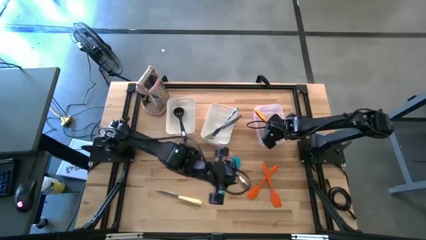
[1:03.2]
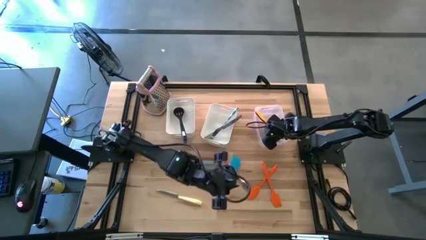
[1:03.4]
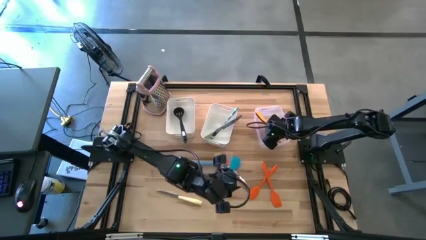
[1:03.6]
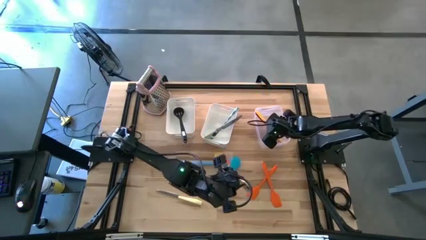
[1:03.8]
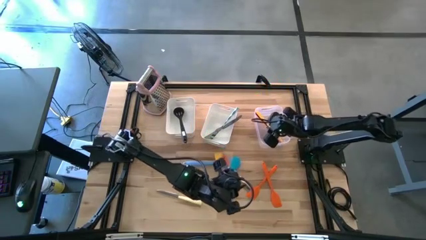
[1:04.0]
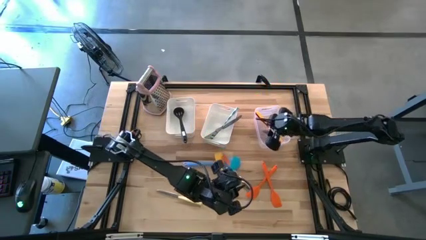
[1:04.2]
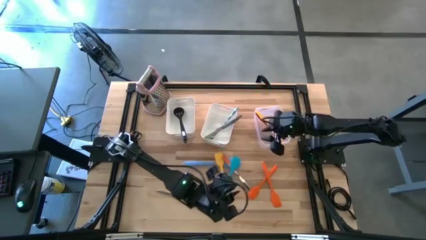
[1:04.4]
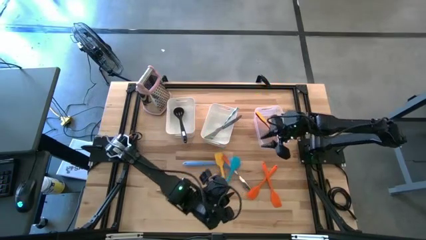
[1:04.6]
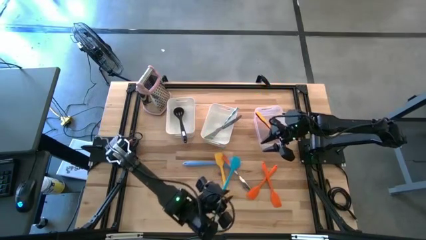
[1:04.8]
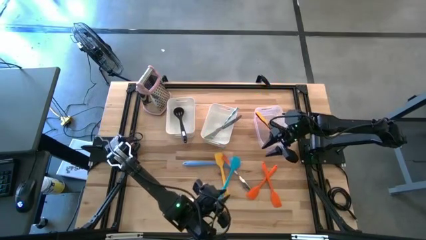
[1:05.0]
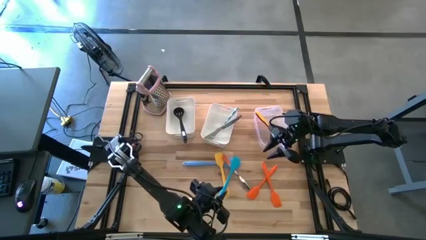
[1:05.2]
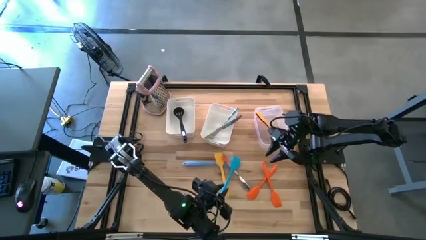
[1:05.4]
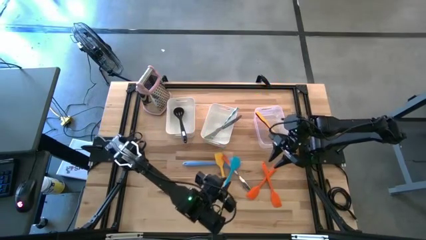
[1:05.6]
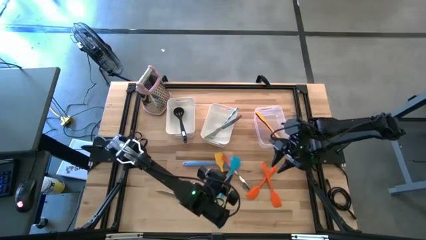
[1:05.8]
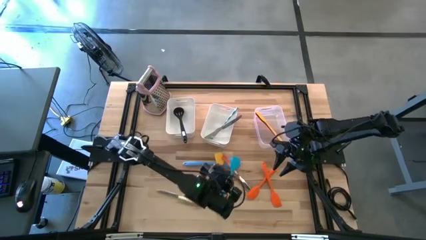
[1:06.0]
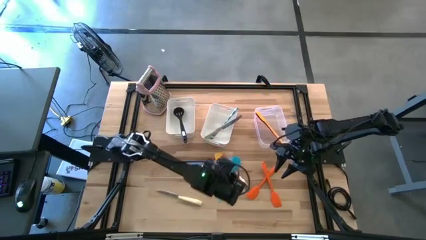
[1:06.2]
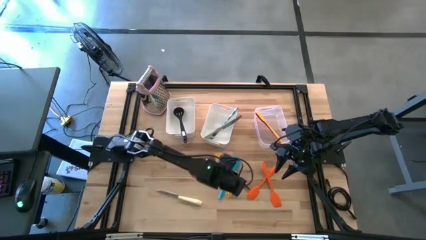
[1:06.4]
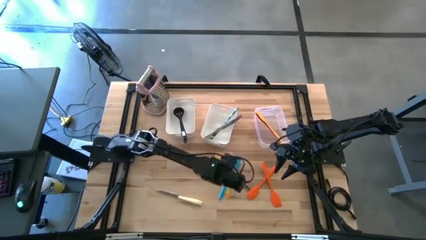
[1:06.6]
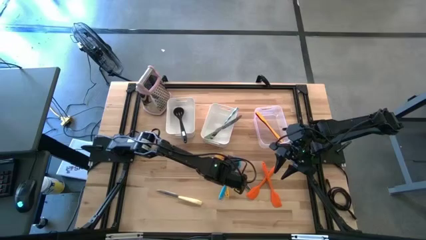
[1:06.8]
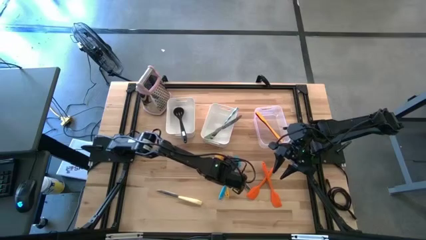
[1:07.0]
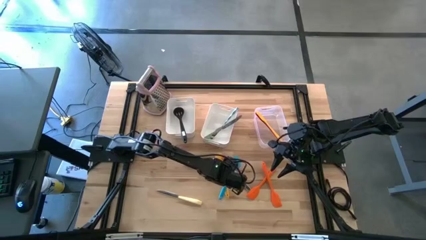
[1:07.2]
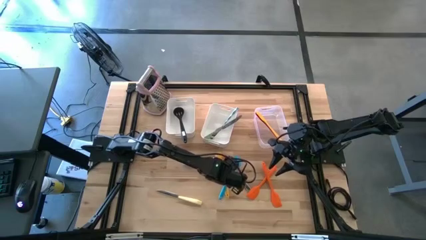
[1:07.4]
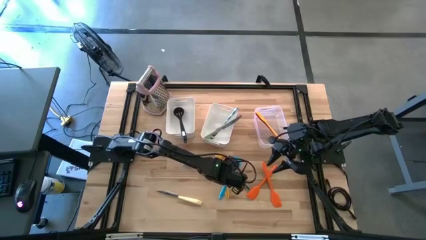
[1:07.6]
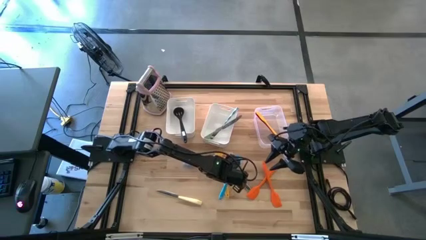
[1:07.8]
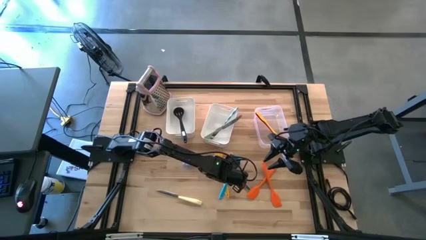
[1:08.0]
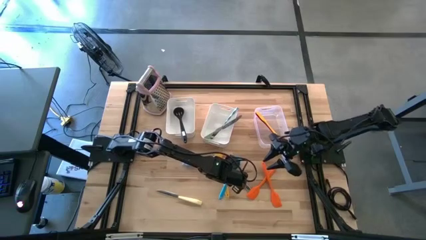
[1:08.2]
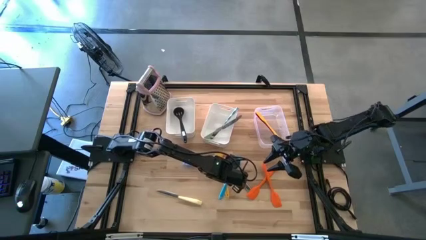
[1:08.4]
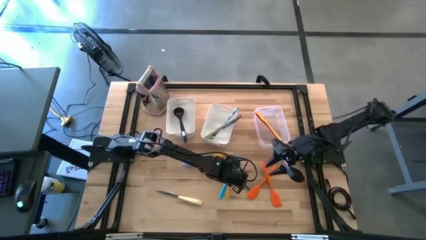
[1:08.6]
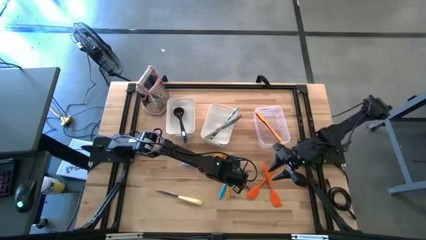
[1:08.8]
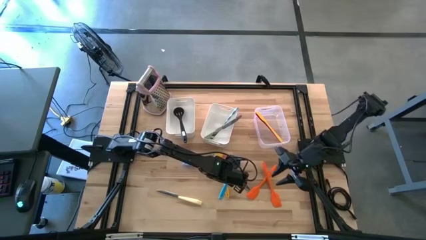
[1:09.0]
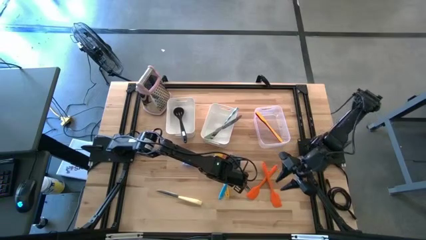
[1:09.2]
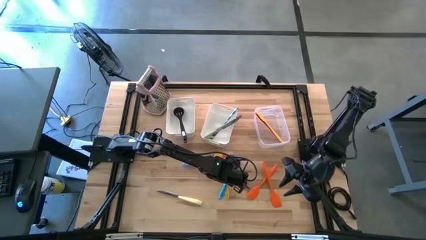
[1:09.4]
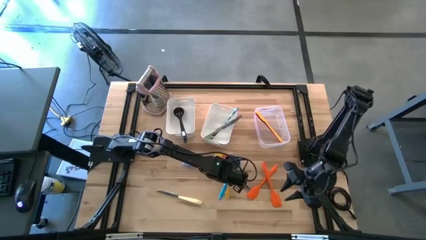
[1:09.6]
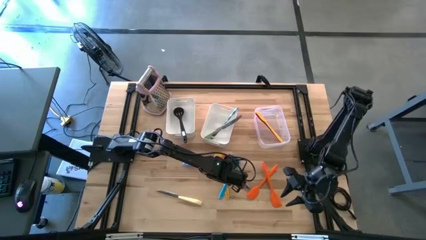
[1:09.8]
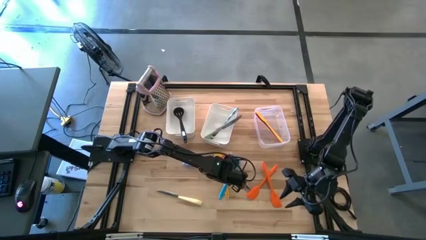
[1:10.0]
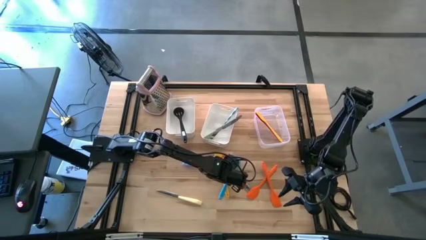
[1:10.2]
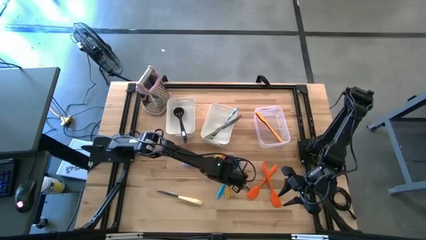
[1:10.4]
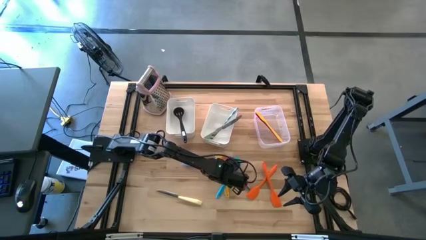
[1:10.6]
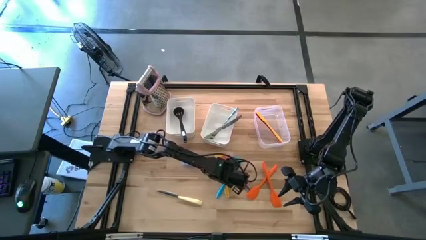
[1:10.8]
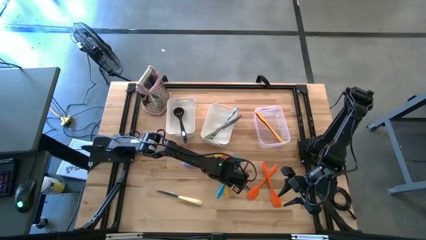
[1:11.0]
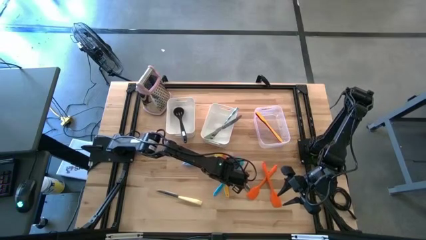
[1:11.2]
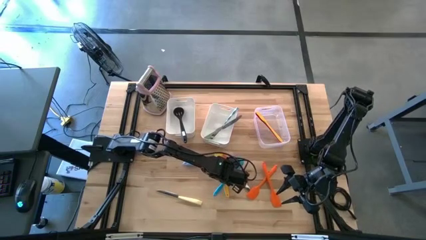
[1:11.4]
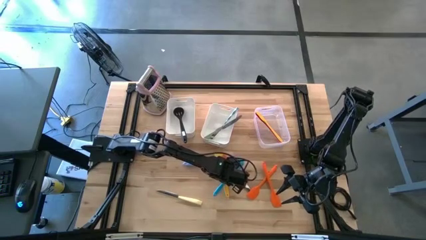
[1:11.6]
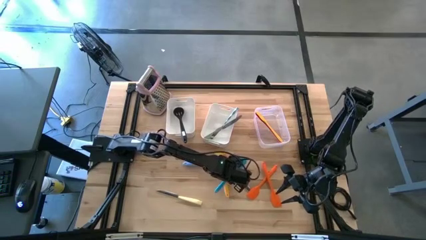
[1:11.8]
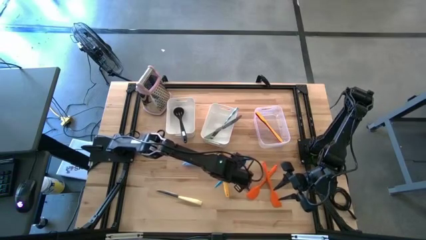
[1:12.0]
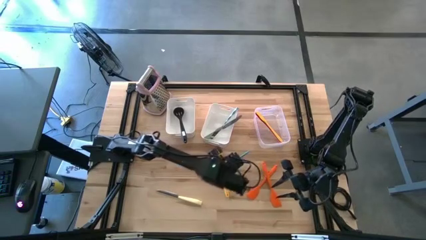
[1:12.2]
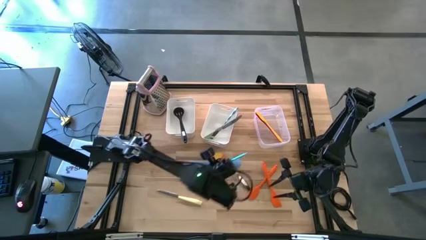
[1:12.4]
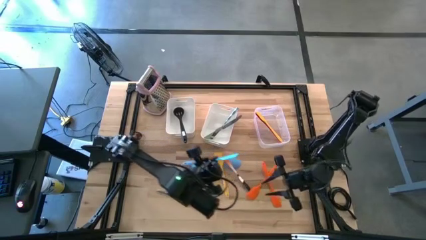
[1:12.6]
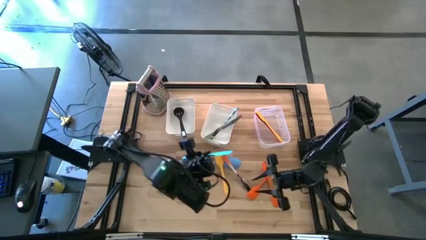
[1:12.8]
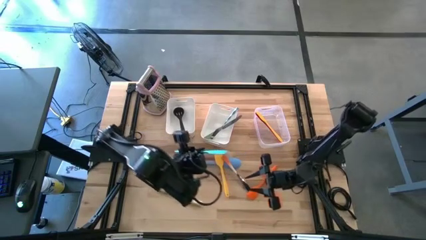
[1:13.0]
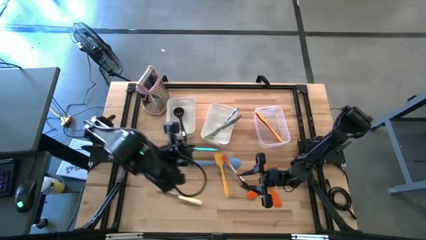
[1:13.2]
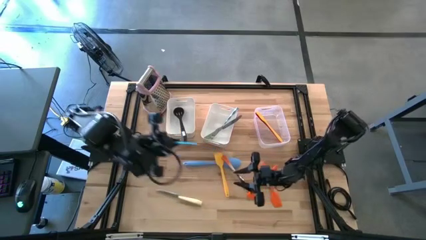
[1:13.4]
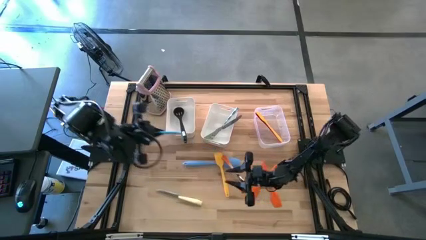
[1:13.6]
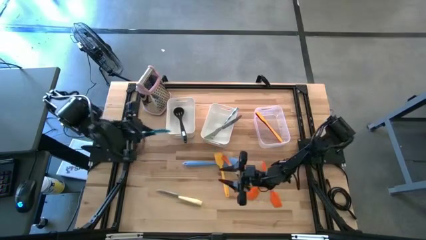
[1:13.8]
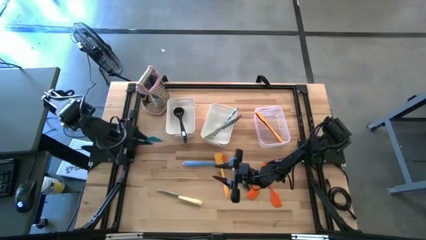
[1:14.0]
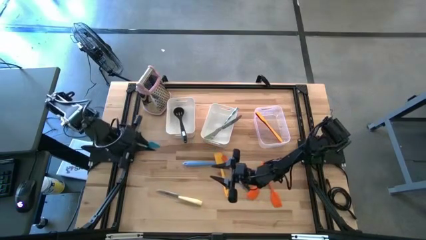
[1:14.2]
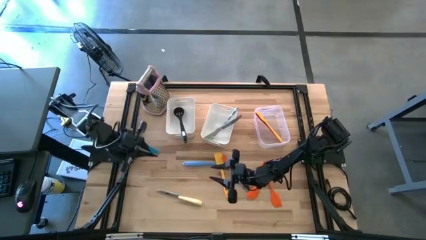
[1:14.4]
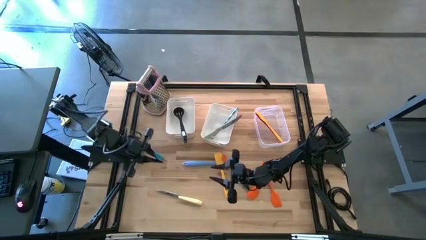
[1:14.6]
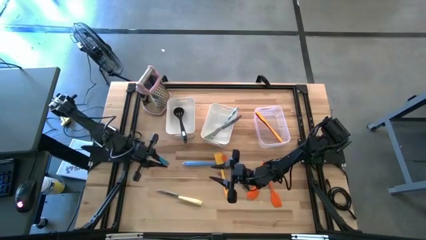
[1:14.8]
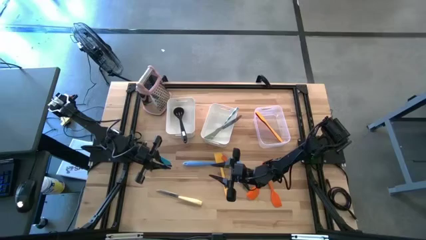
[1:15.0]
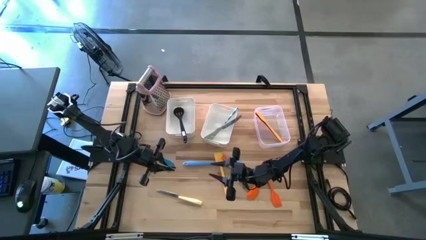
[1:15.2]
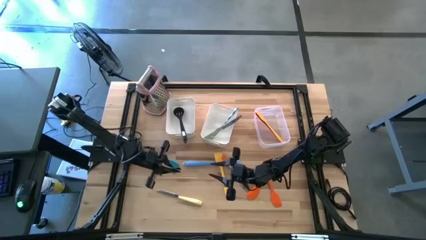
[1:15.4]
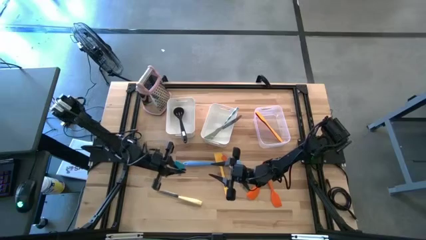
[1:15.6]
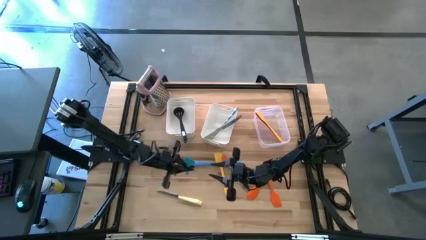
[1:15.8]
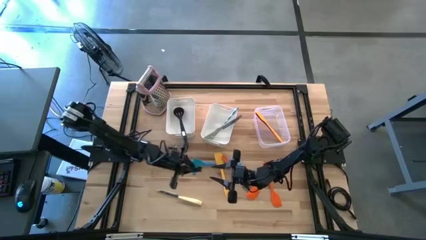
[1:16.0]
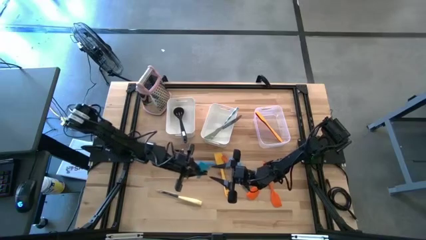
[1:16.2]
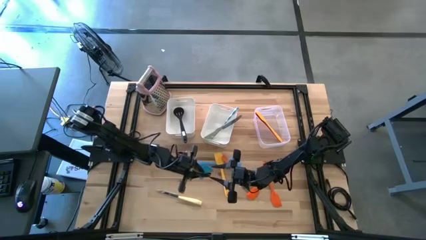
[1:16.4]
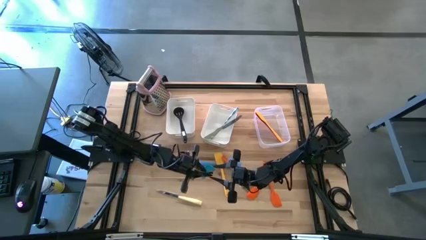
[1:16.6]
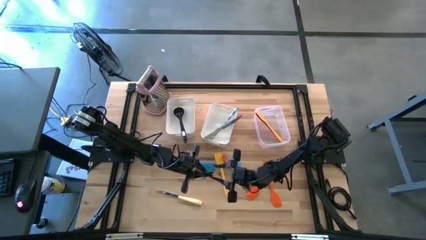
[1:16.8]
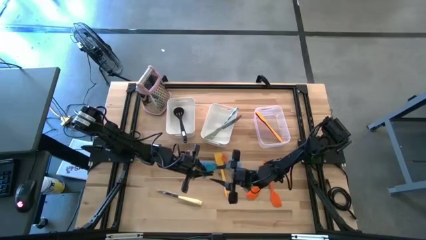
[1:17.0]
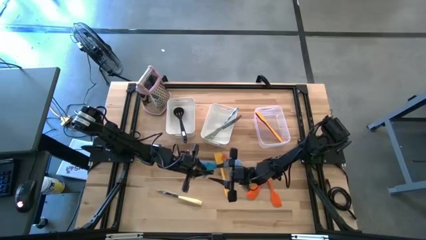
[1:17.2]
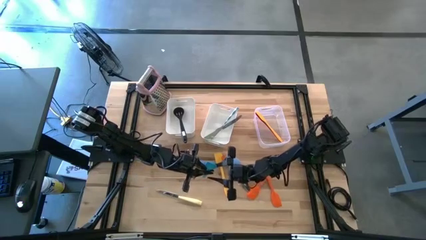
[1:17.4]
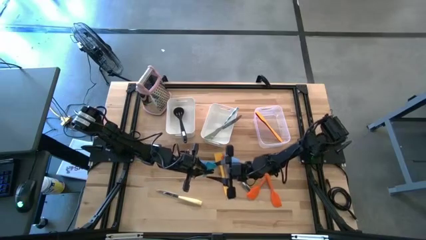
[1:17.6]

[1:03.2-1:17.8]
Task: Pick & Place Kitchen Items
Put the blue spatula into the transparent bin
